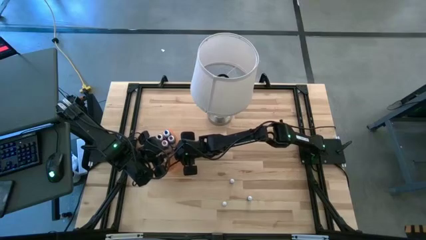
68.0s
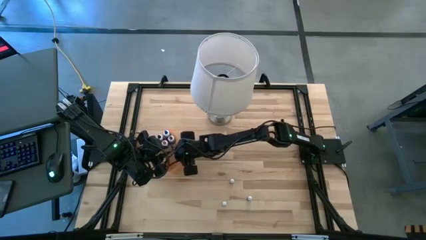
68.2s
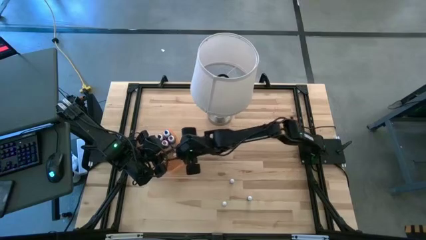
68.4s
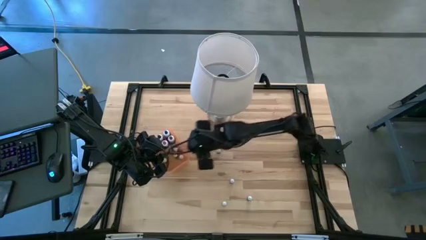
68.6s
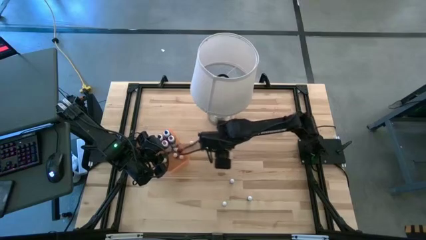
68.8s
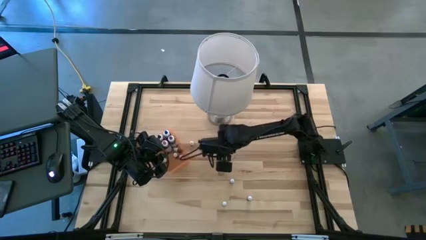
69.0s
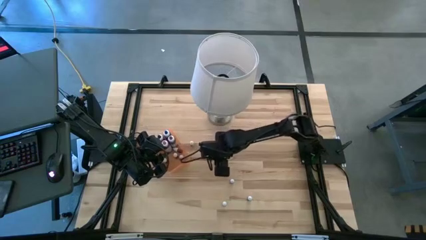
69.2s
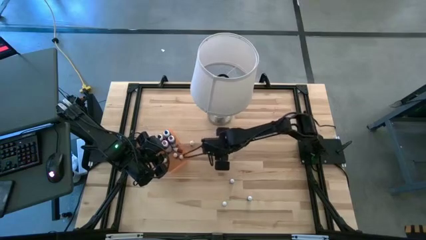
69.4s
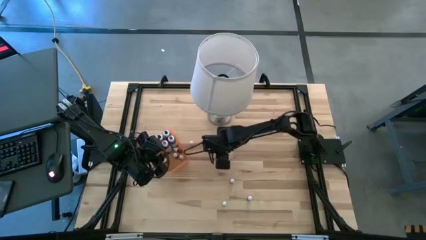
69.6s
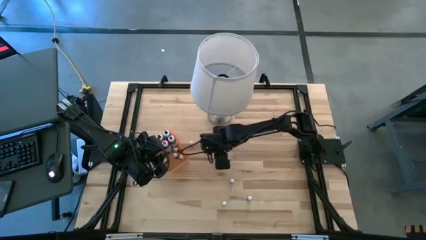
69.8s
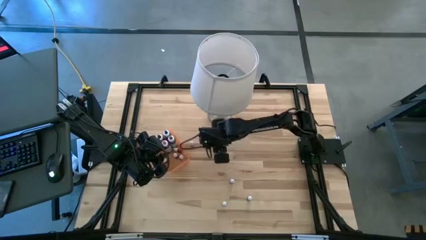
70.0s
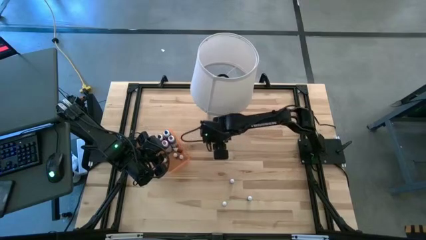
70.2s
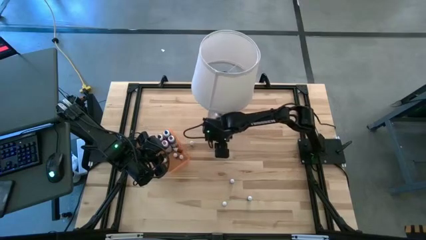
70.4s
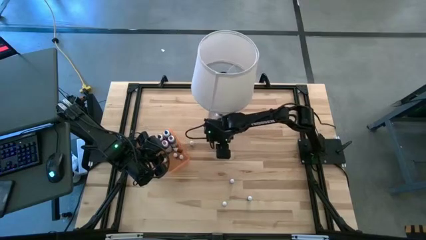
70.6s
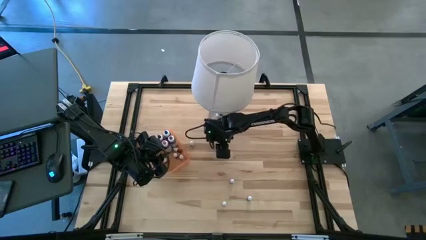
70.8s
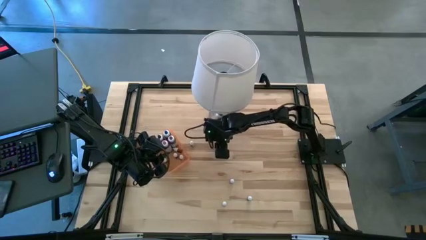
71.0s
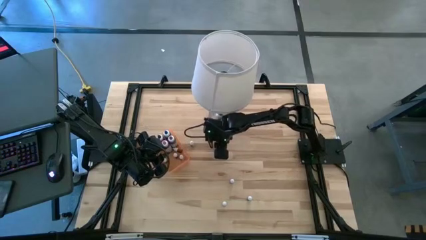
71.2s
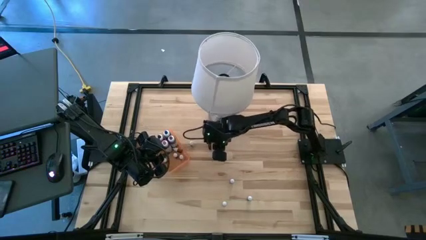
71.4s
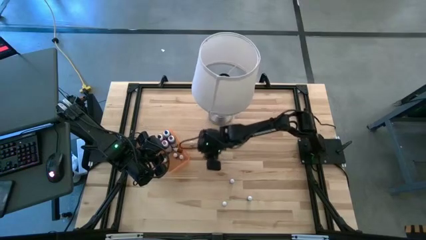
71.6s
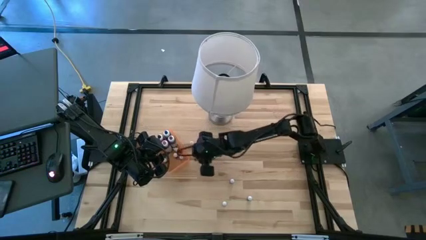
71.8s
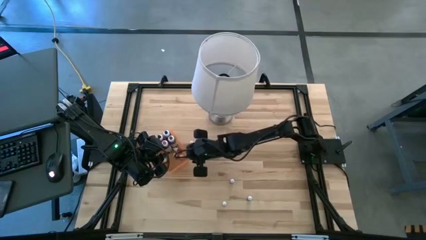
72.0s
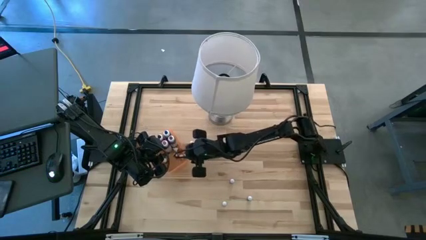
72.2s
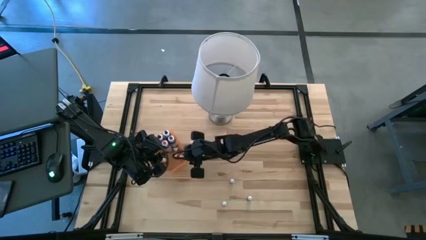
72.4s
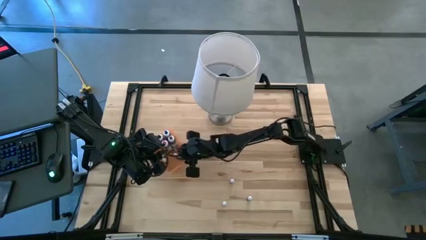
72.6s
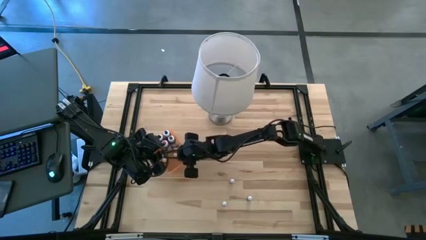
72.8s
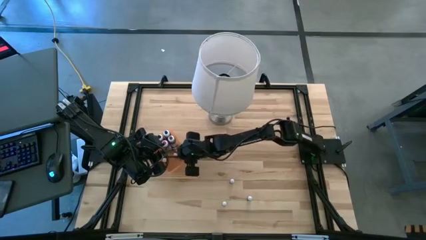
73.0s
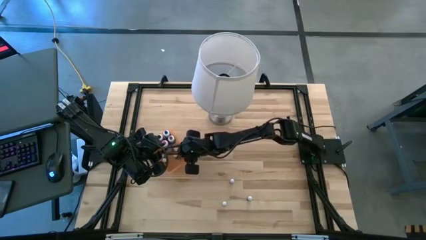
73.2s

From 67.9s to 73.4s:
Task: Pick & Place food coloring
Put the dark green food coloring bottle into the orange bin

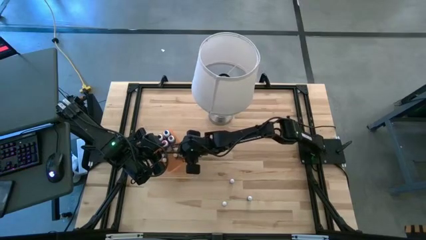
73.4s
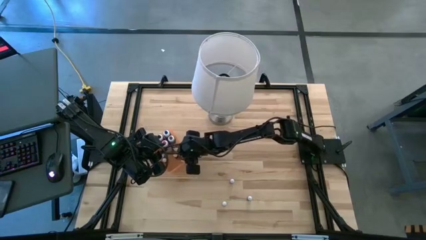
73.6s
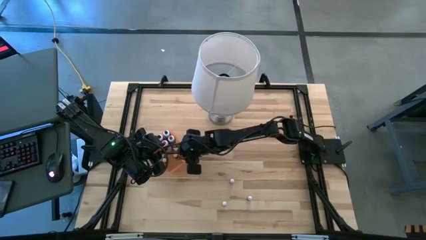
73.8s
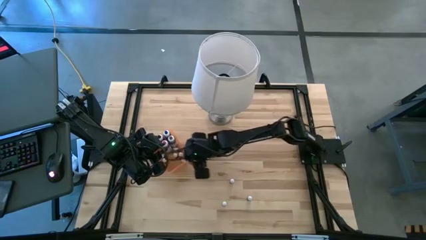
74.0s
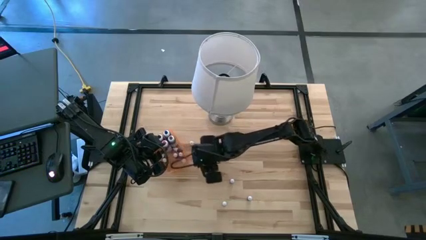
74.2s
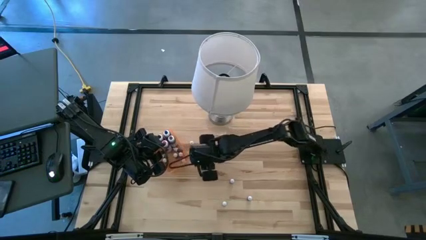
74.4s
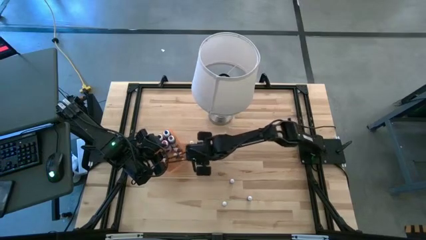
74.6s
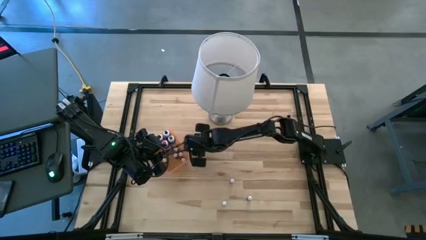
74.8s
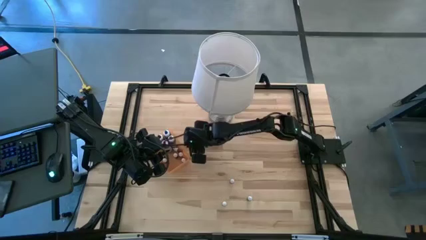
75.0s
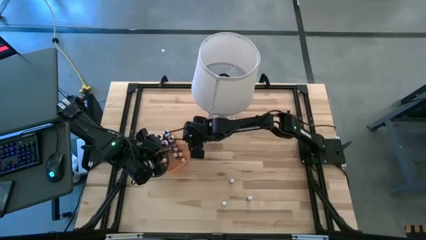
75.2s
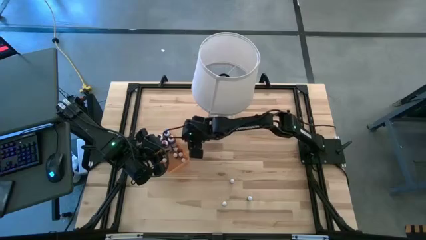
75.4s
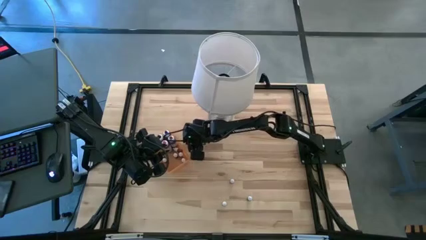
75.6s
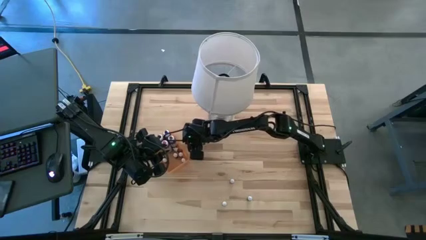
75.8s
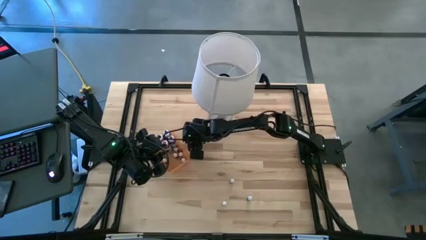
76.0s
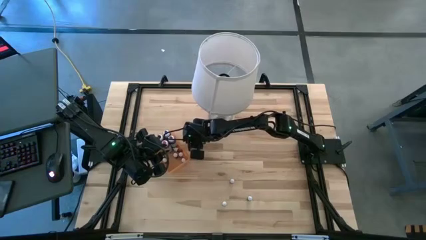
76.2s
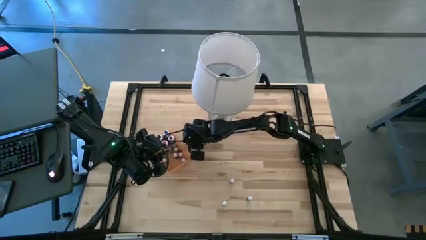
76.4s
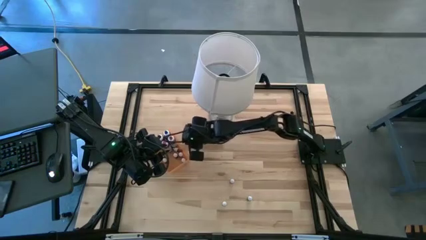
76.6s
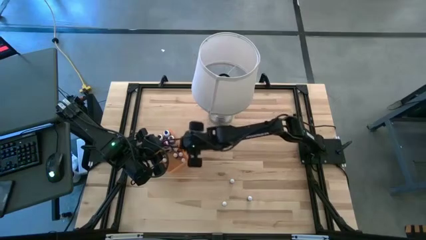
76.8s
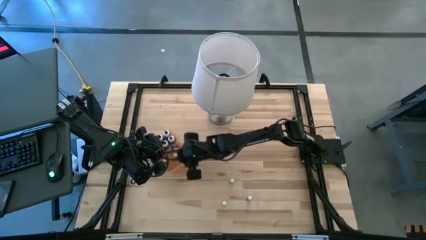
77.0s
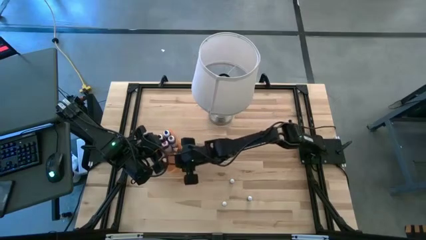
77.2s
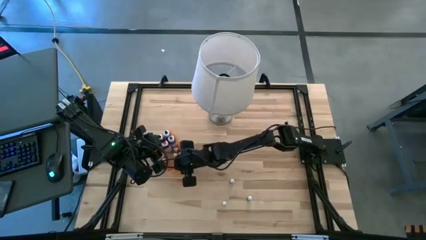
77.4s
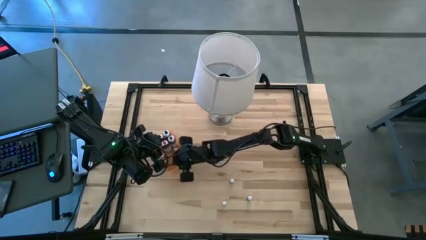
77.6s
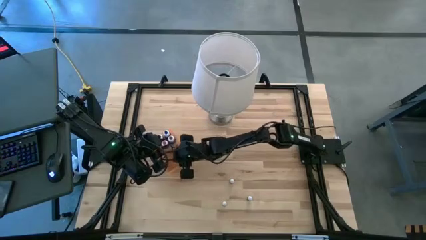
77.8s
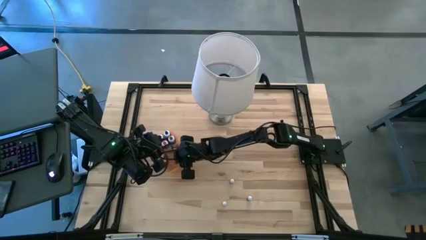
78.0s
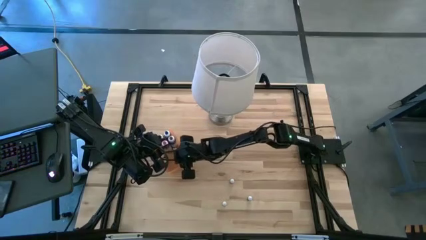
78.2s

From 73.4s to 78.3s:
Put the black food coloring bottle into the orange bin

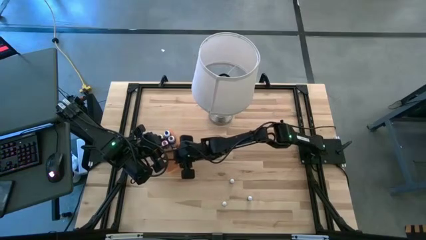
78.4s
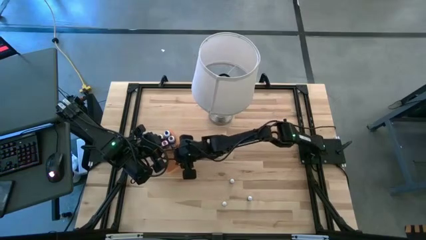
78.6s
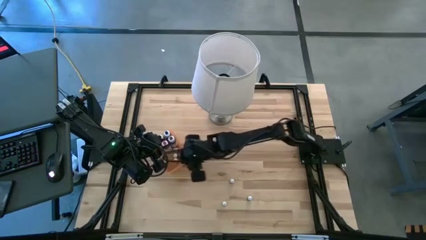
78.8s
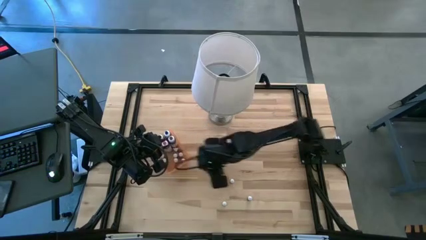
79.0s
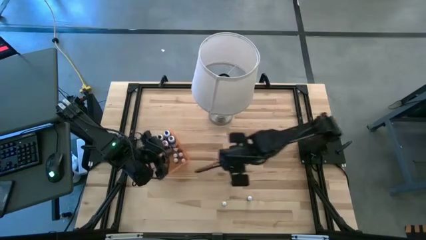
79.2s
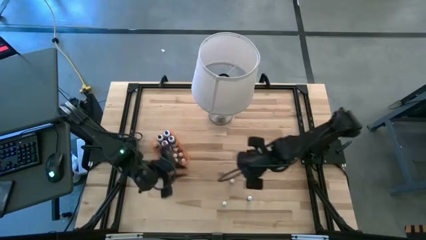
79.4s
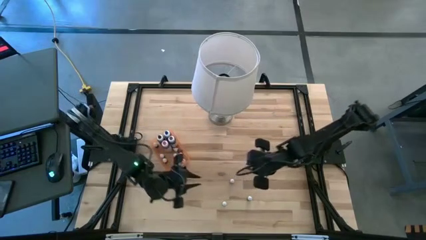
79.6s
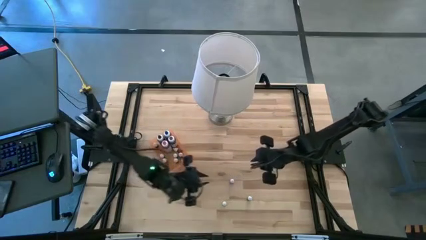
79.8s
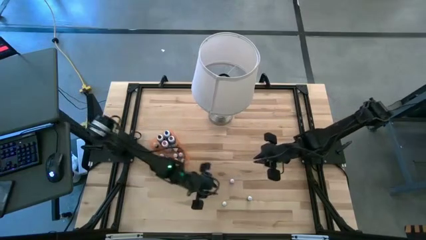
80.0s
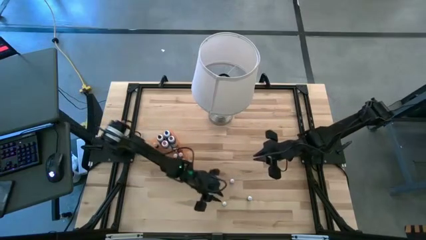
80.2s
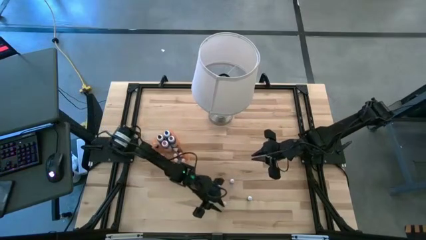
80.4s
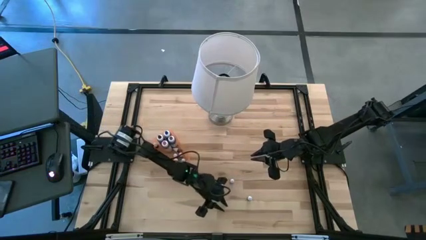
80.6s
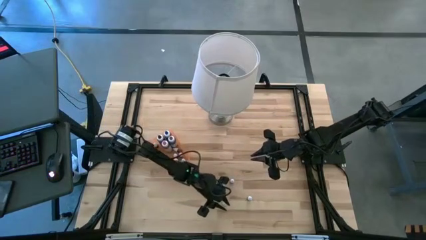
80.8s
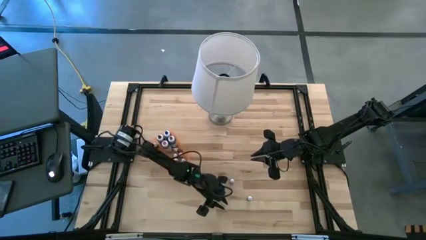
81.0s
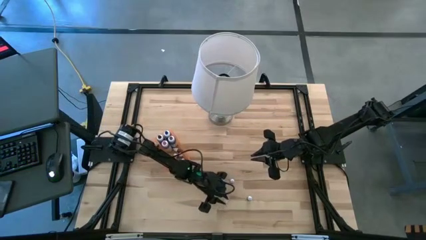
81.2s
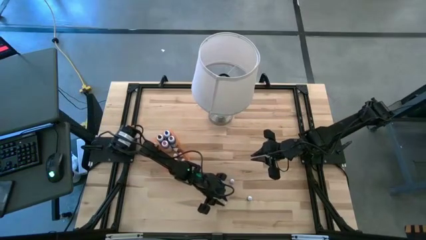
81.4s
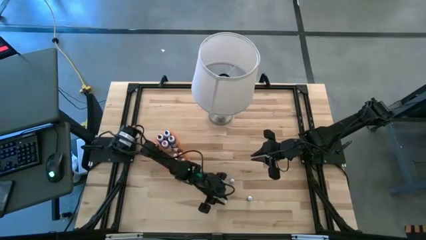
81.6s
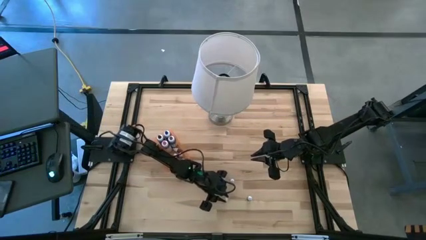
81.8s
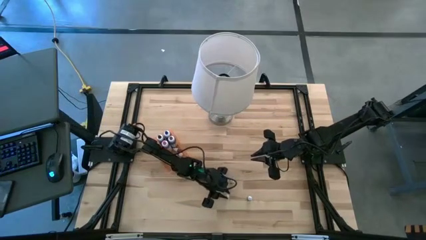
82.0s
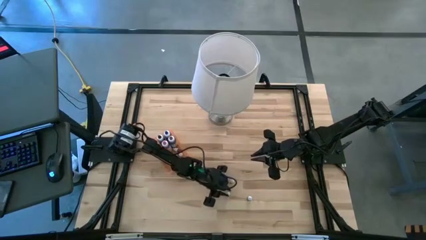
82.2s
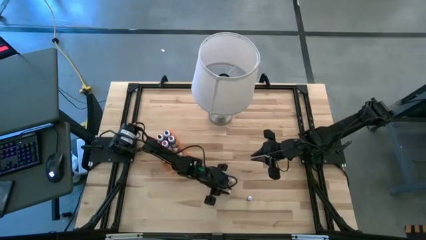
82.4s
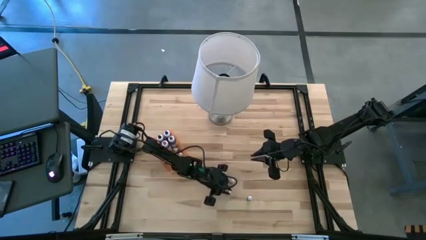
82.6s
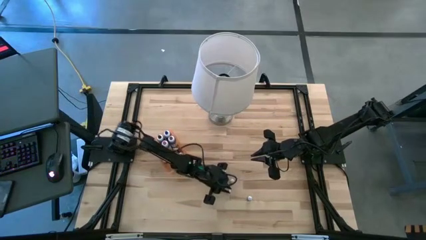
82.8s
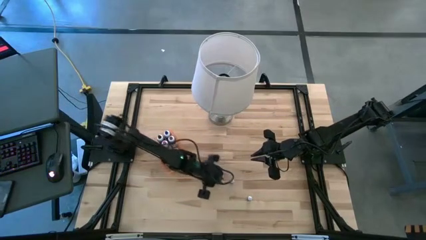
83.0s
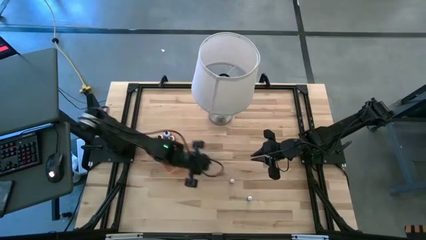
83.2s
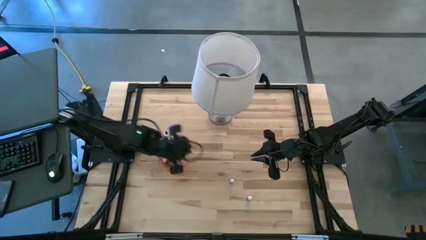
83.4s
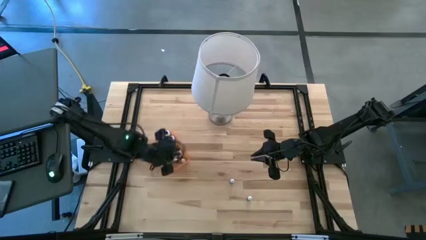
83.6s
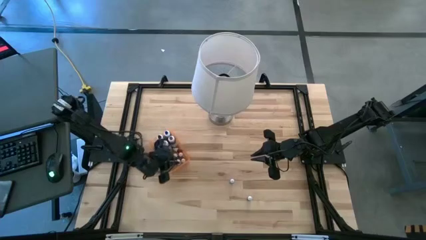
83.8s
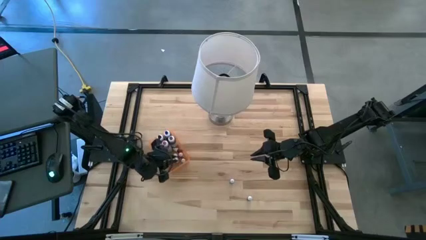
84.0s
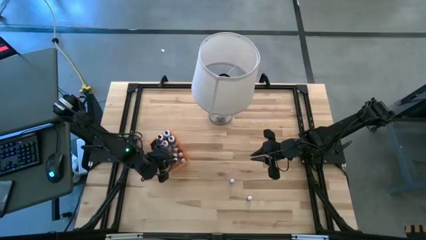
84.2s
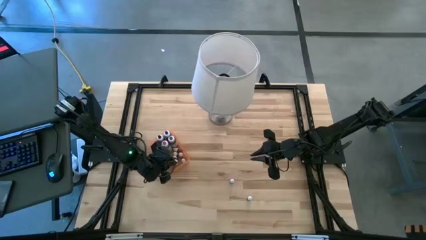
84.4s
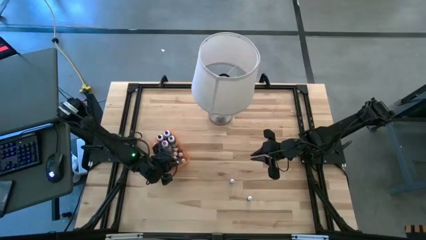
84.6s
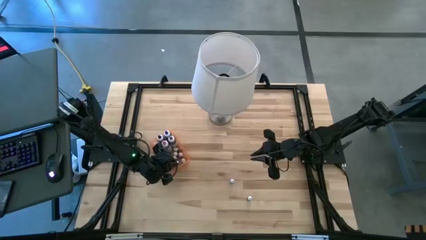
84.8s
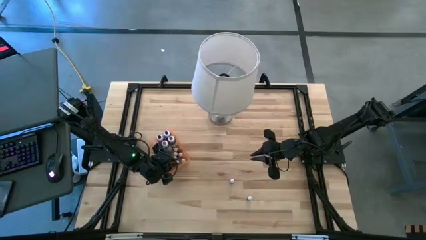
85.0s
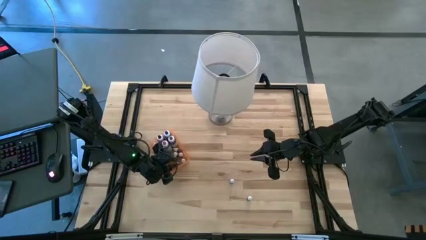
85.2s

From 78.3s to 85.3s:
Put the green food coloring bottle into the orange bin
